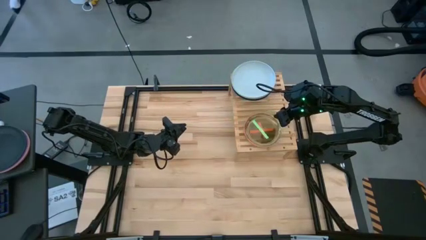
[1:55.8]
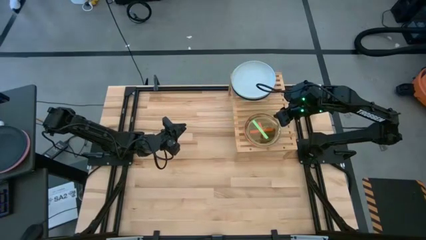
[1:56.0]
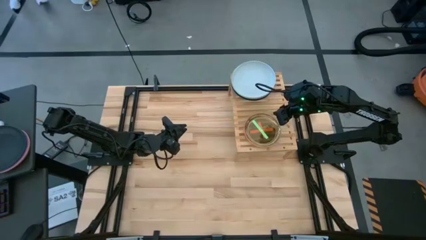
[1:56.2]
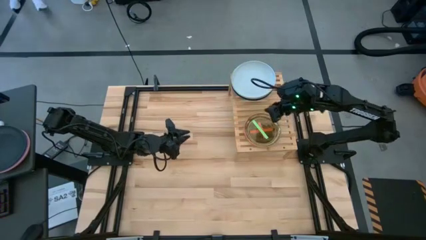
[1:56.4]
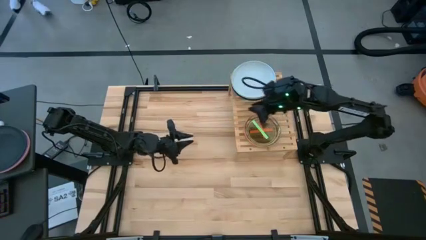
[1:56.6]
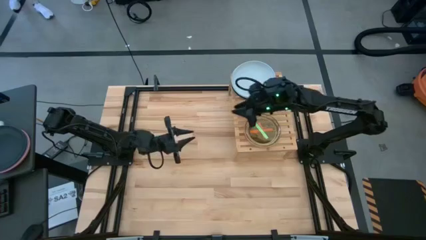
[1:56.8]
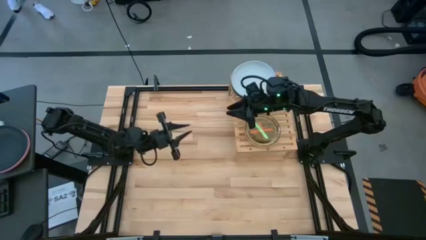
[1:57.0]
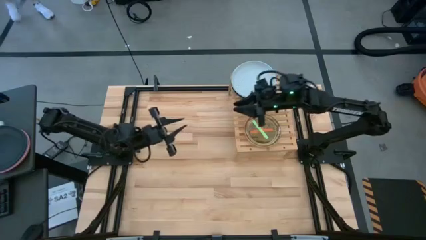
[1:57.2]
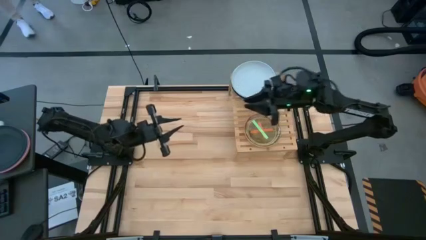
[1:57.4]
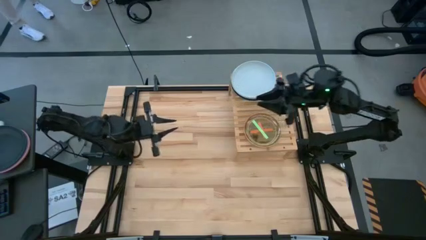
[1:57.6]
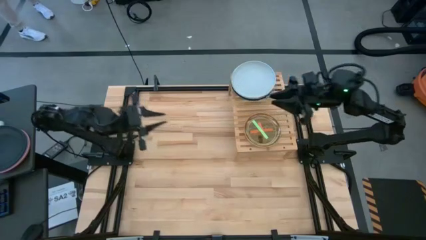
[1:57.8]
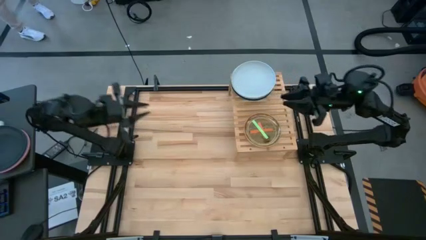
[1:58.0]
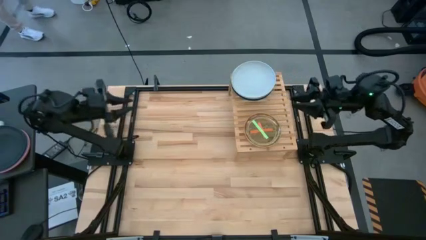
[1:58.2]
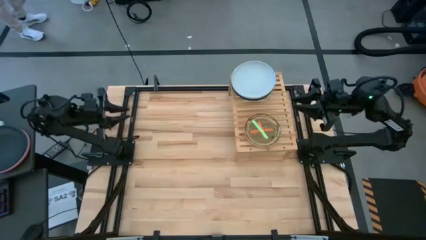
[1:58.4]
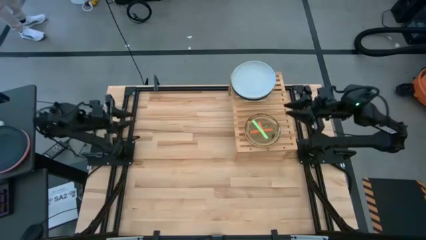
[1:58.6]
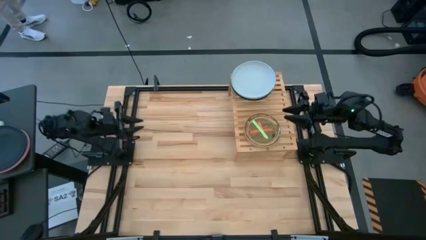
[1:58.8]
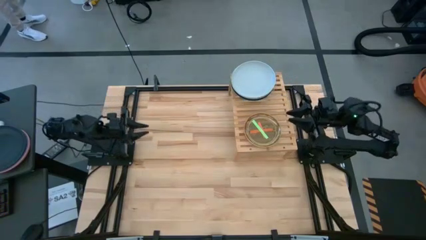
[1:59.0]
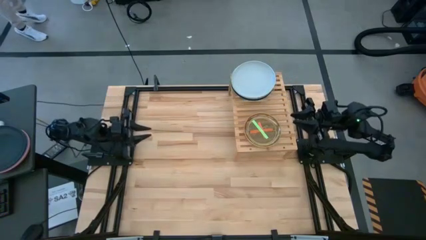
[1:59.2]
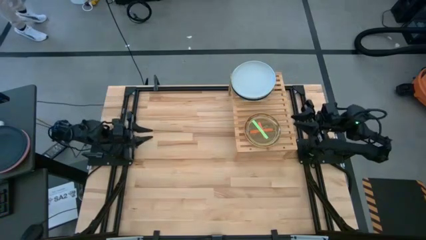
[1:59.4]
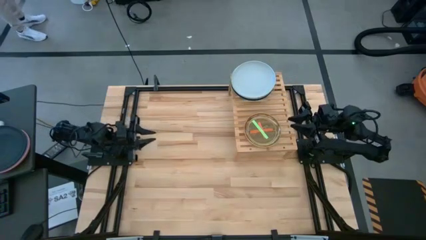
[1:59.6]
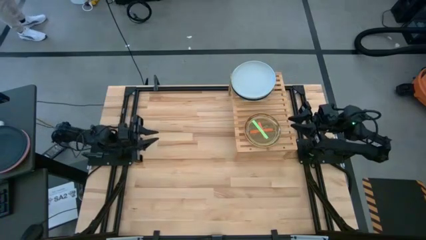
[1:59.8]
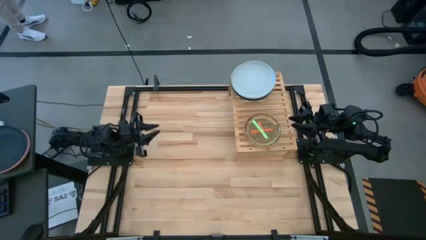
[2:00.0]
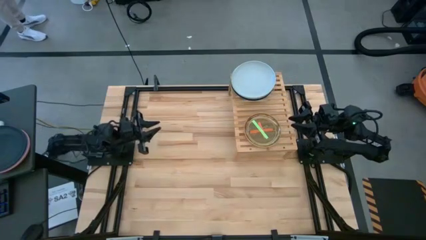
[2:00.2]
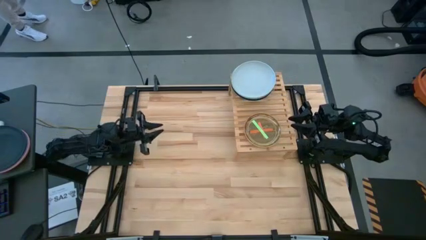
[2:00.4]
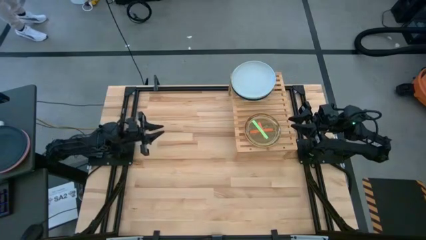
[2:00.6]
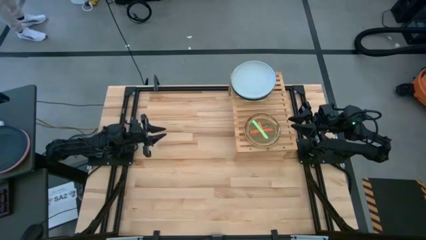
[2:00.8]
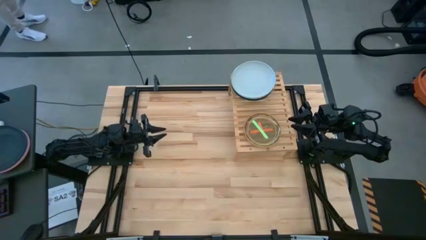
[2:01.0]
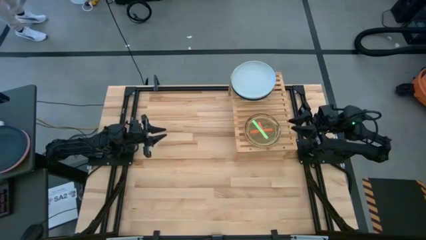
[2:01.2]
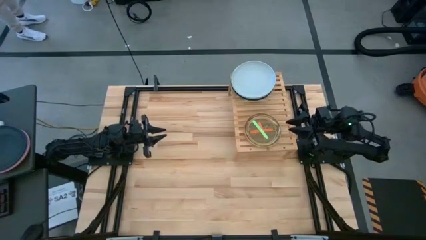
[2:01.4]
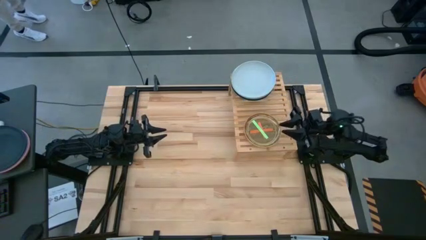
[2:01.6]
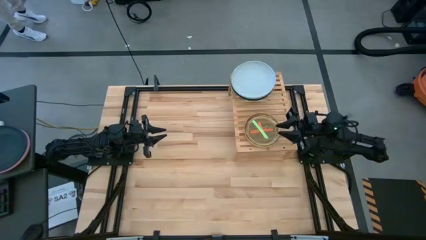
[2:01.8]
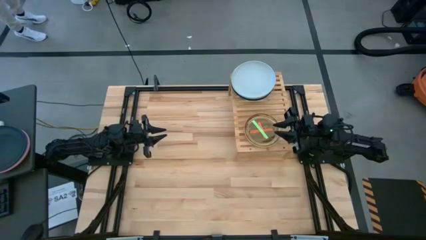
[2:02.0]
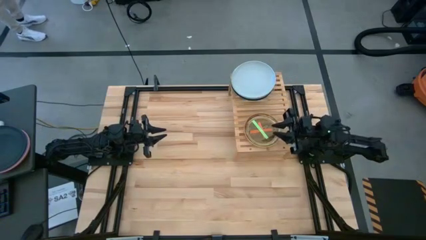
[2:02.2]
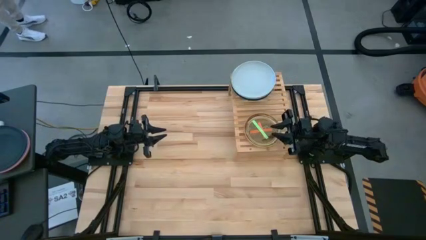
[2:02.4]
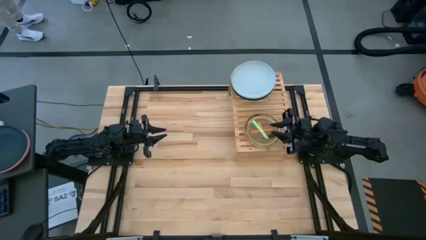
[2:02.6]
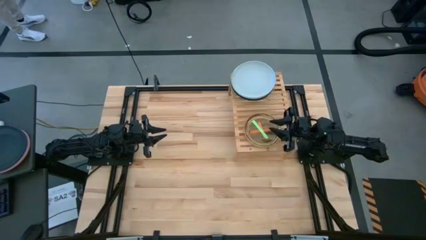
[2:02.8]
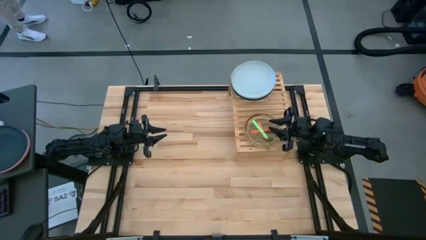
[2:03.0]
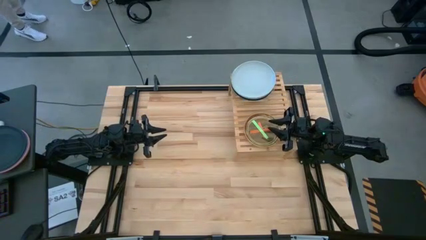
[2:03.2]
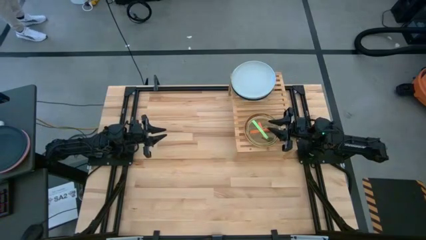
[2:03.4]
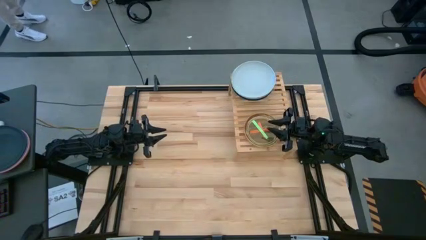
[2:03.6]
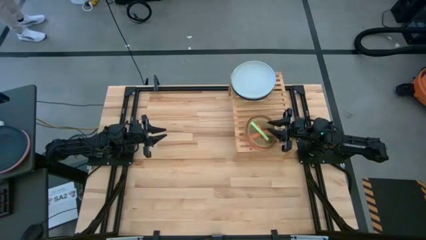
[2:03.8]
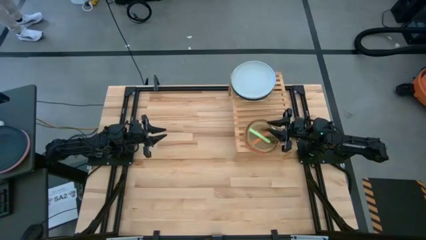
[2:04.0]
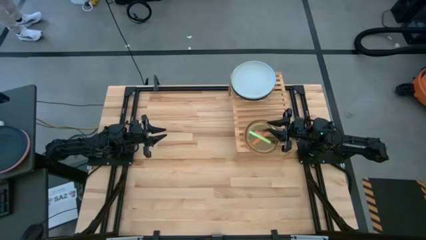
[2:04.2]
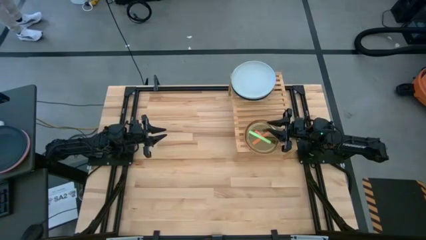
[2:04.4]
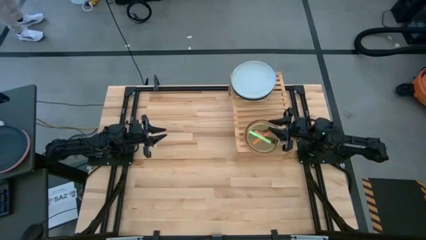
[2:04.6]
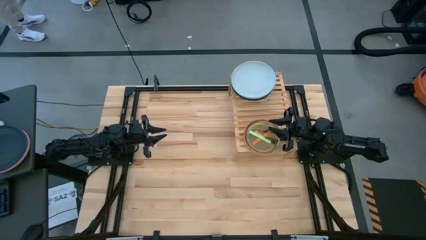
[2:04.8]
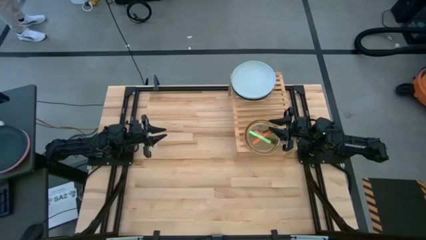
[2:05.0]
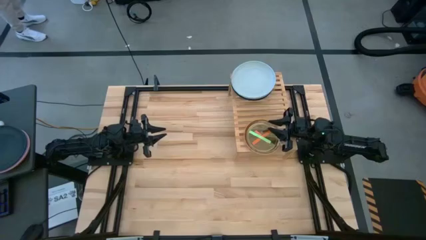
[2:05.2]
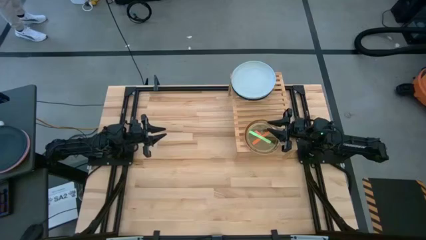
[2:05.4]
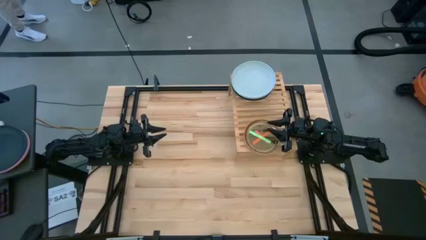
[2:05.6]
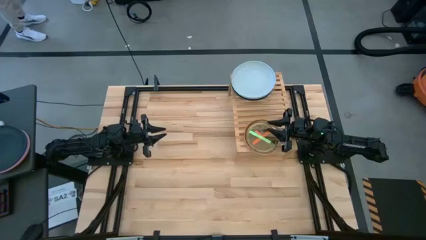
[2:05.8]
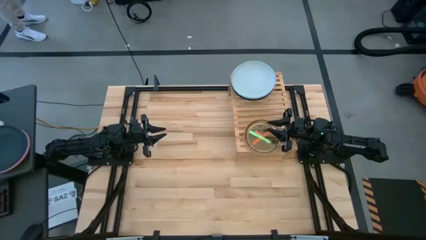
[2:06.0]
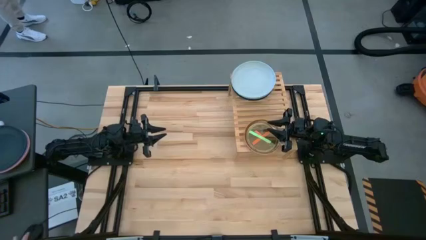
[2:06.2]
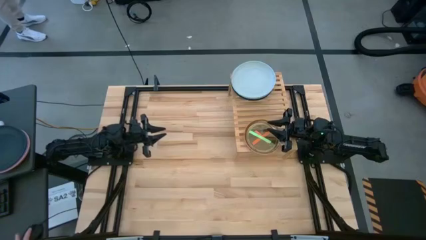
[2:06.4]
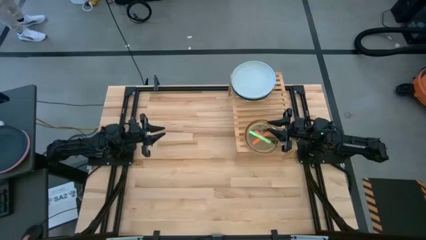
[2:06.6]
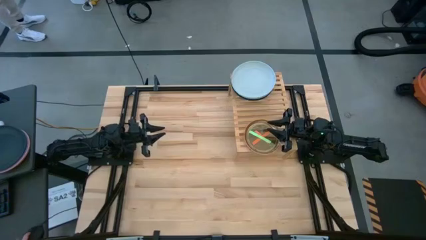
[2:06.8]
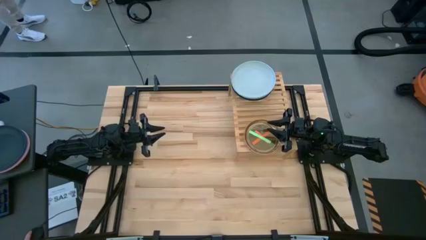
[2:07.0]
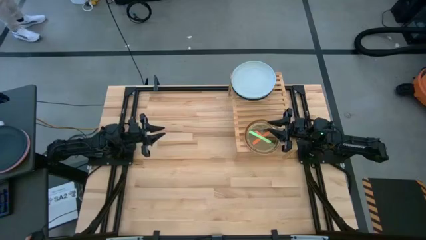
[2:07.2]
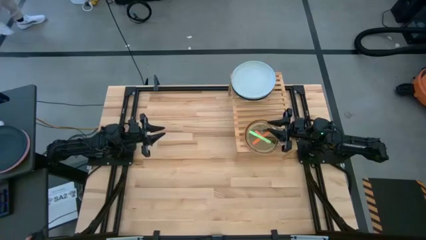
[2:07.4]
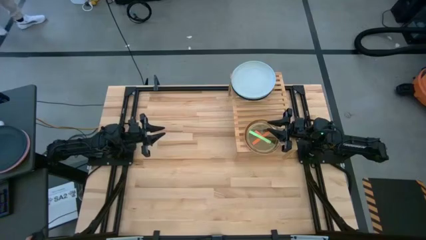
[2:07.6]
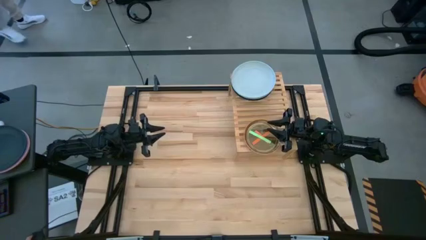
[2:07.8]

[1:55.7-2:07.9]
Task: Place and stack plates onto a shelf
Return to Home Position
